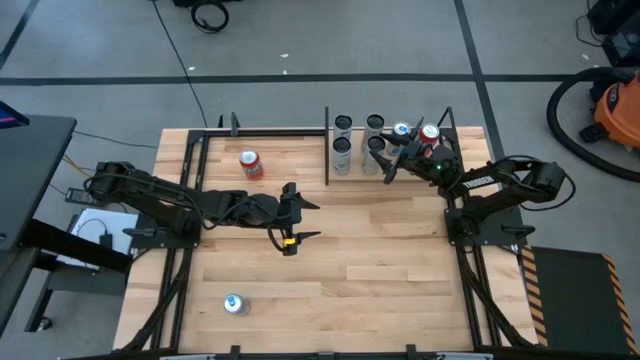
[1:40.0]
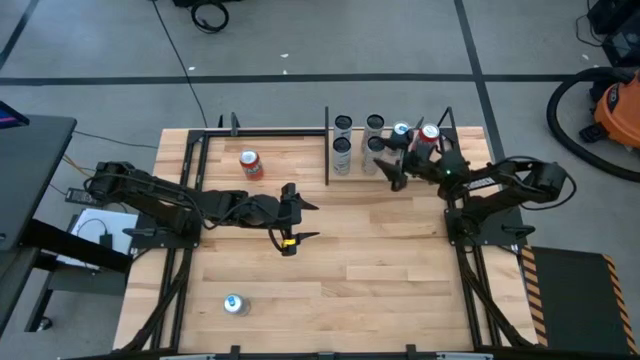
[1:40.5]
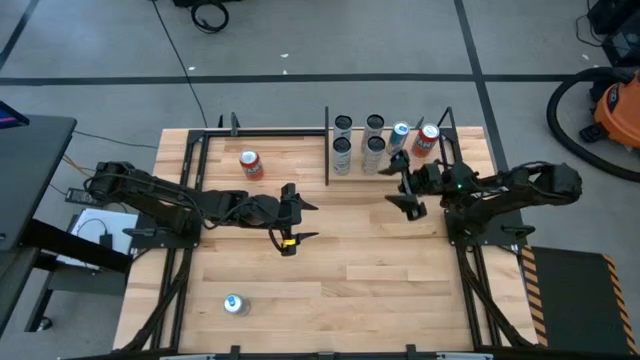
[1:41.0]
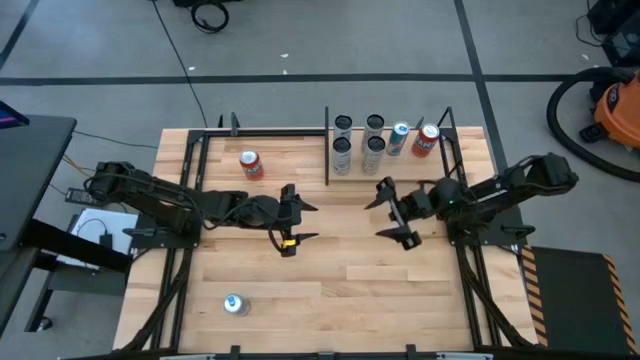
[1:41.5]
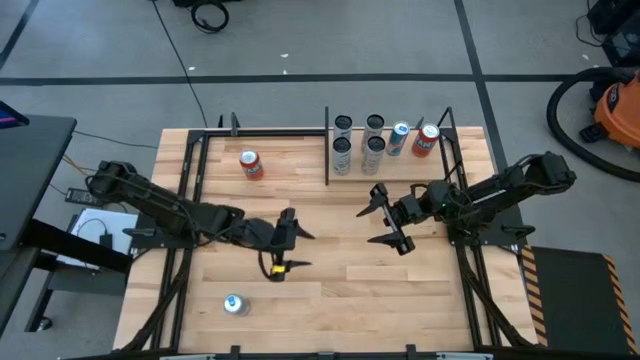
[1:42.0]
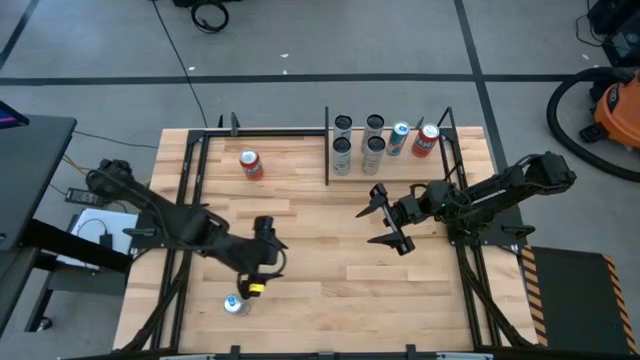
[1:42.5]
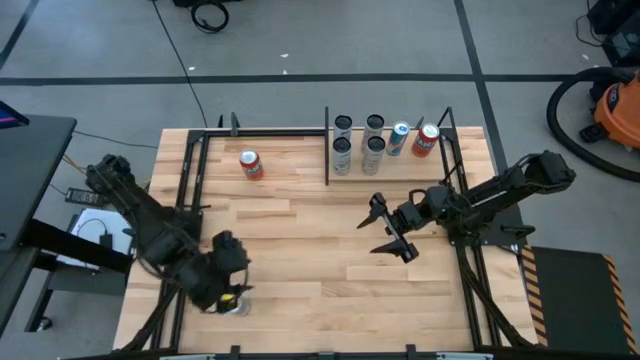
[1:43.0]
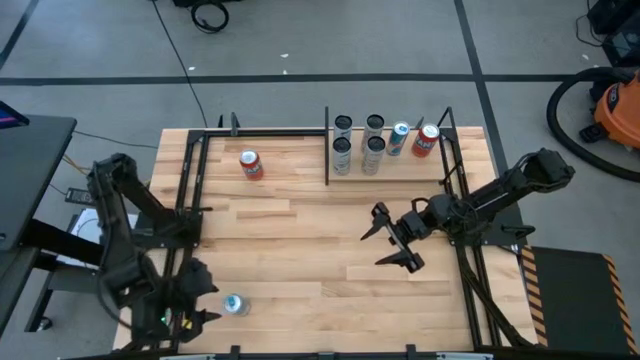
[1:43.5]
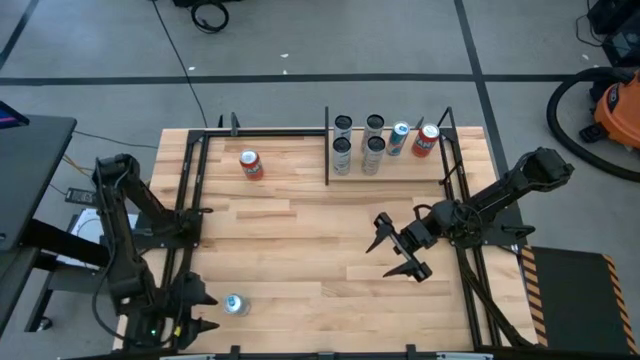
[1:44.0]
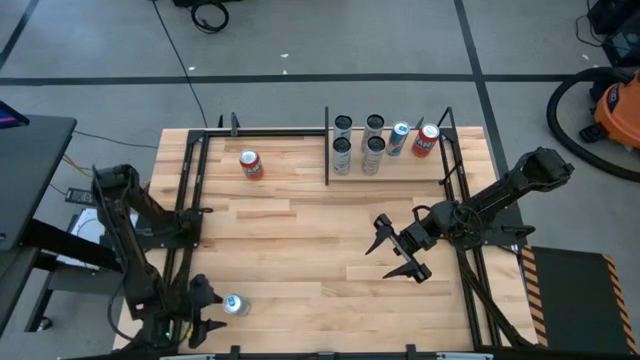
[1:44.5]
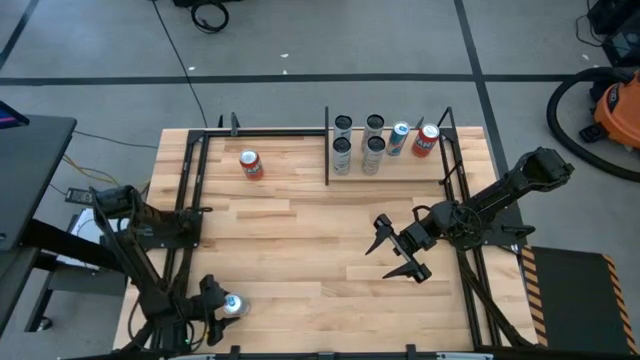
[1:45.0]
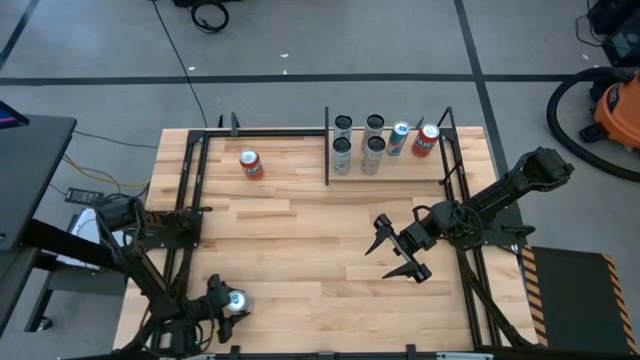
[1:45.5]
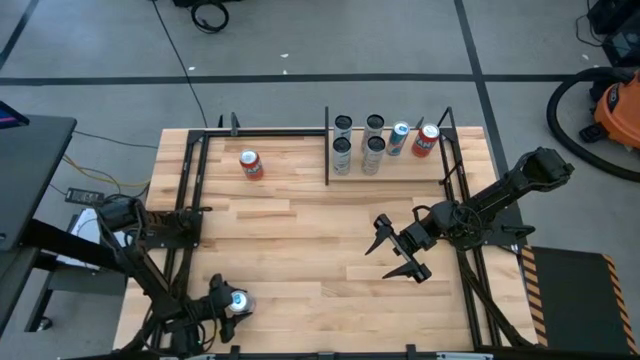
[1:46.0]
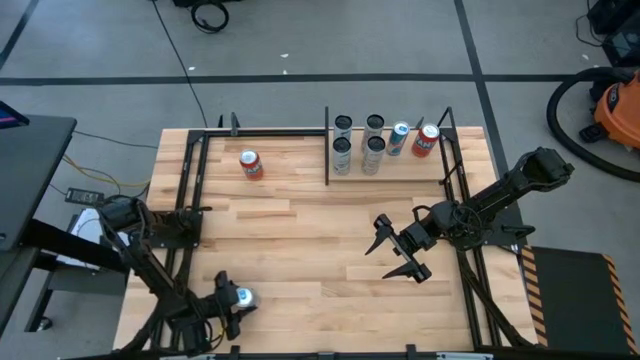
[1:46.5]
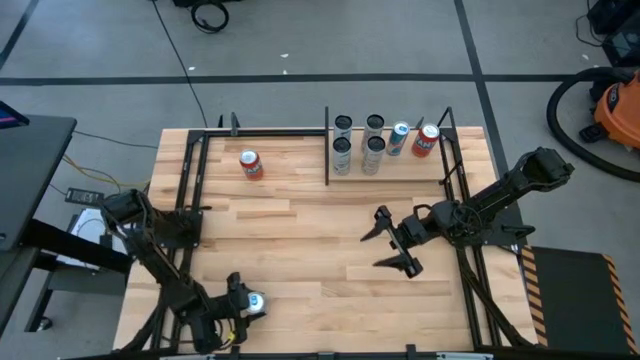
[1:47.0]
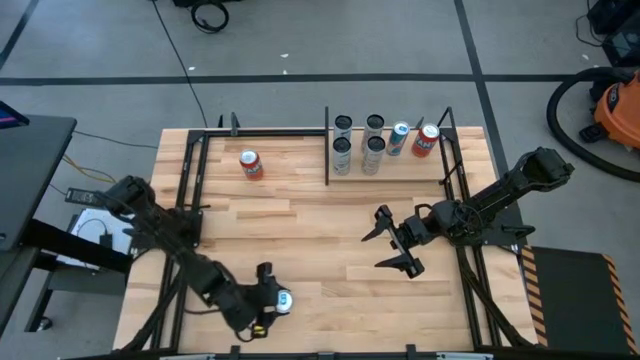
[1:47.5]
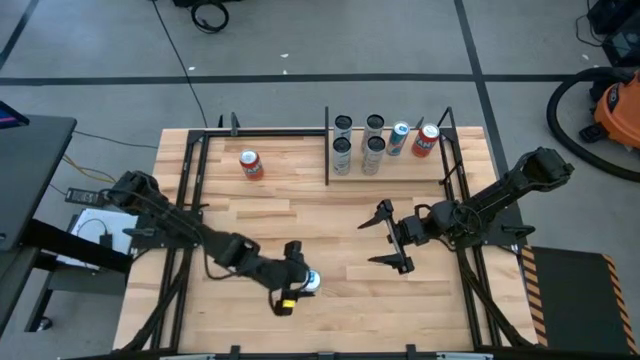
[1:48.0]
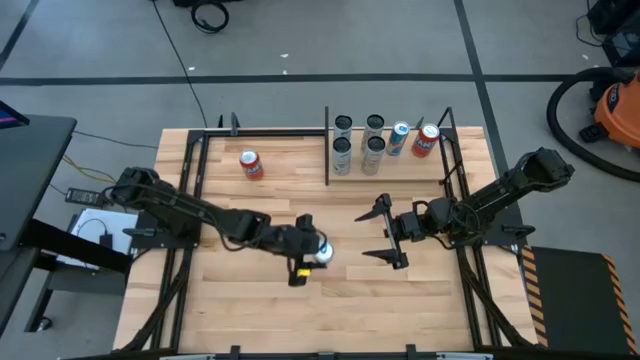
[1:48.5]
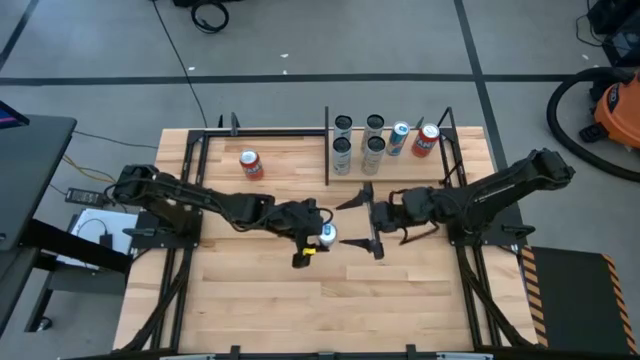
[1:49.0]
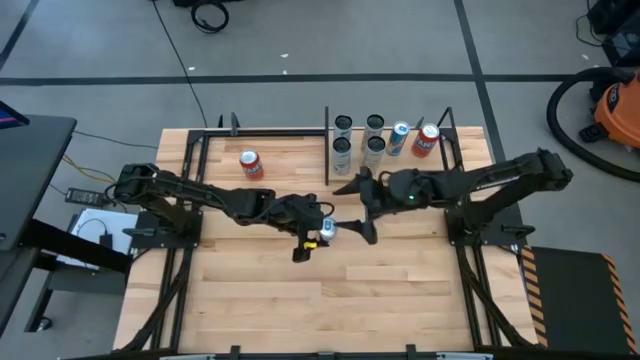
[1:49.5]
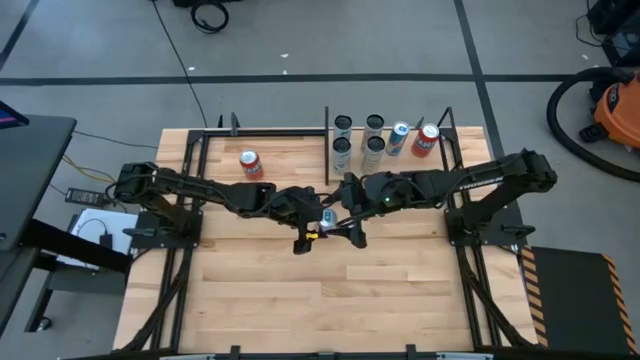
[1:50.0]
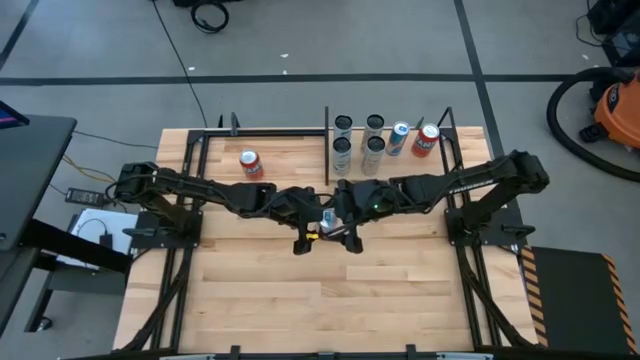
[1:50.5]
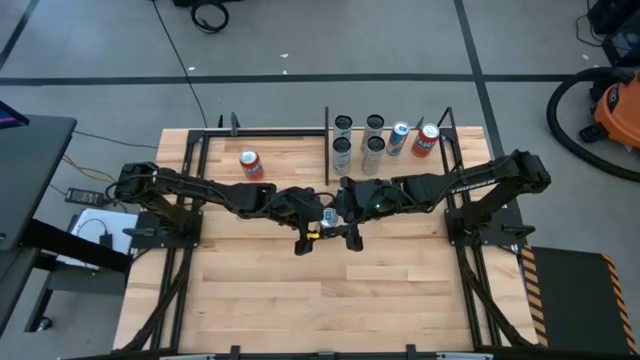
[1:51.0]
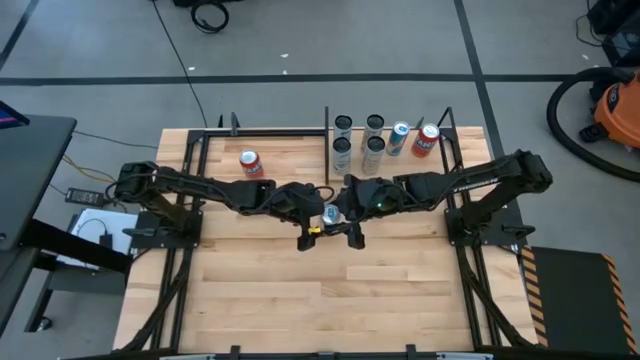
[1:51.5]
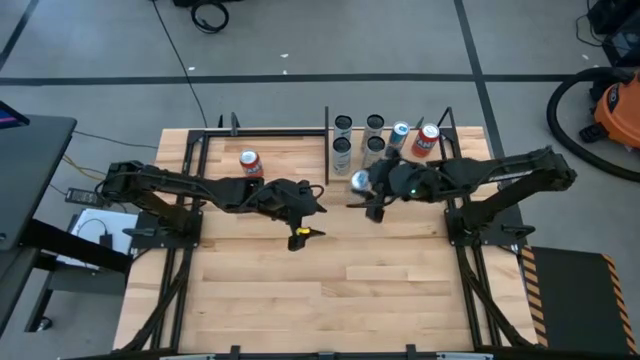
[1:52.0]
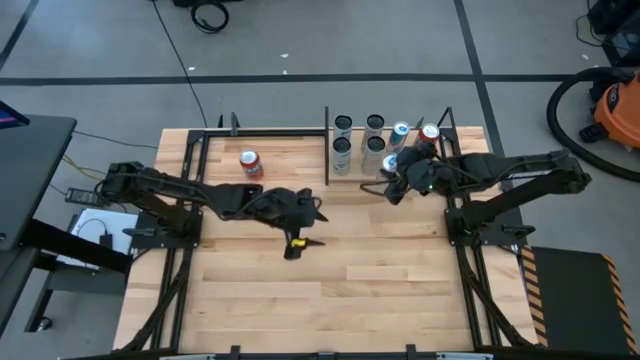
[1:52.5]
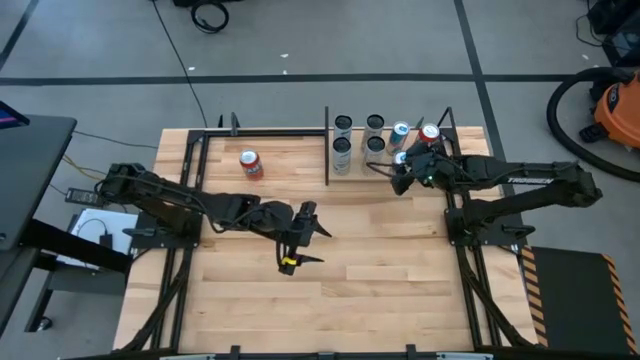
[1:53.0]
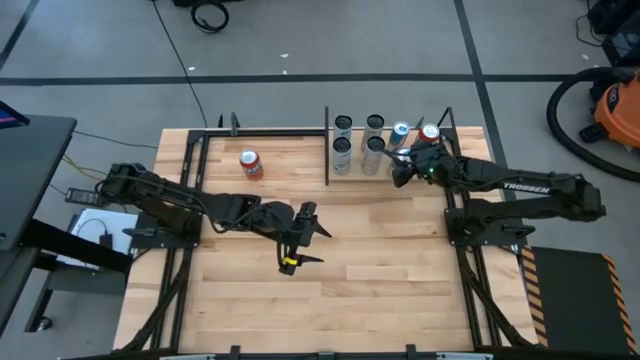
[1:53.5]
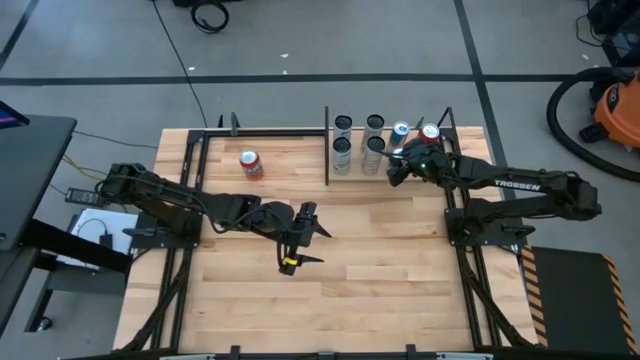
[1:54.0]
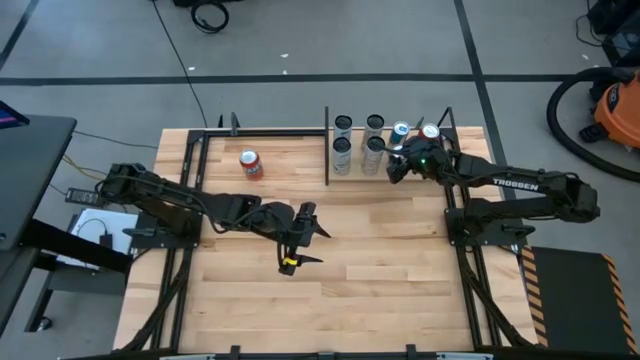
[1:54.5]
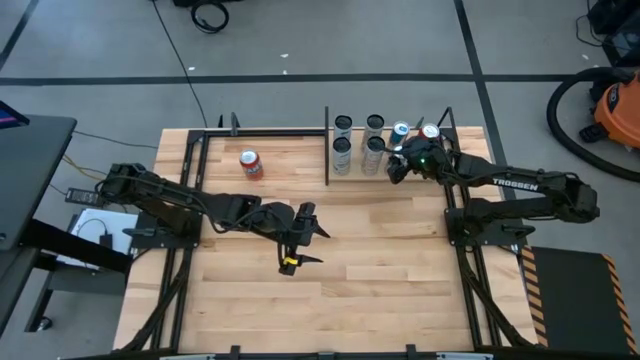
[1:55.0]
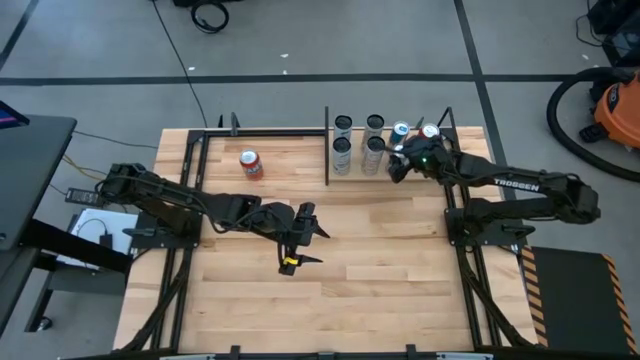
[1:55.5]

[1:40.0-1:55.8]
Task: Place canned beverage on shelf
Put the blue soda can on the shelf aligned with the other blue soda can

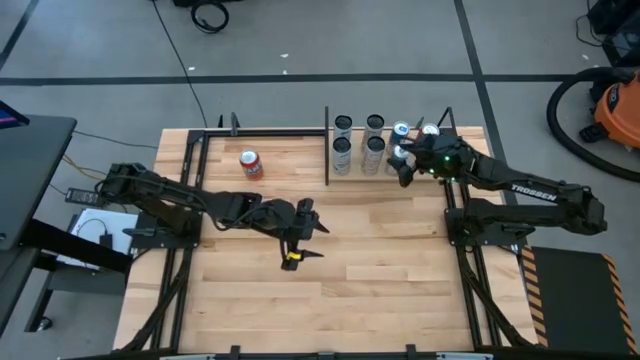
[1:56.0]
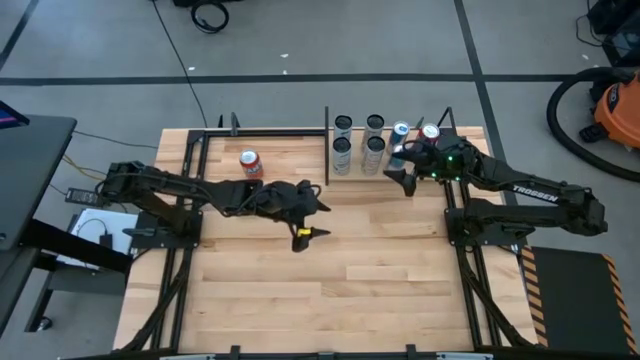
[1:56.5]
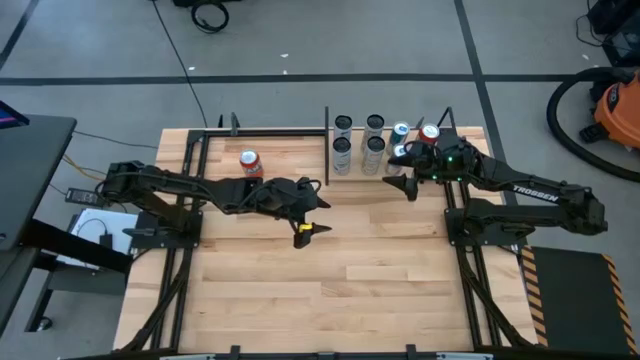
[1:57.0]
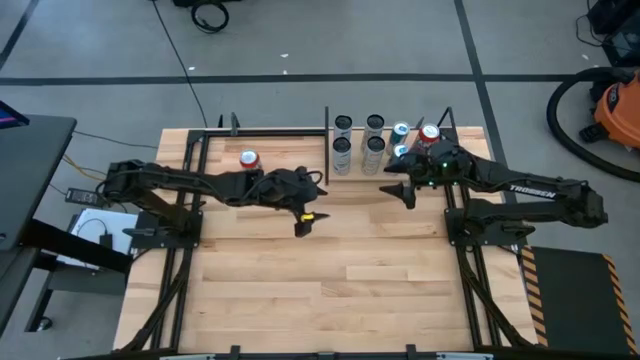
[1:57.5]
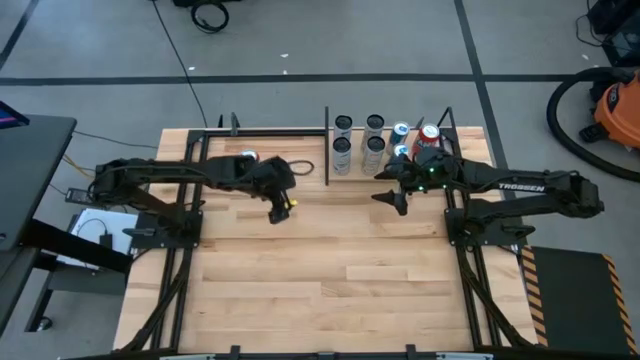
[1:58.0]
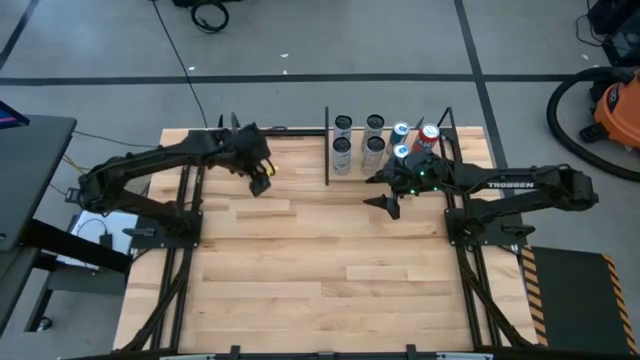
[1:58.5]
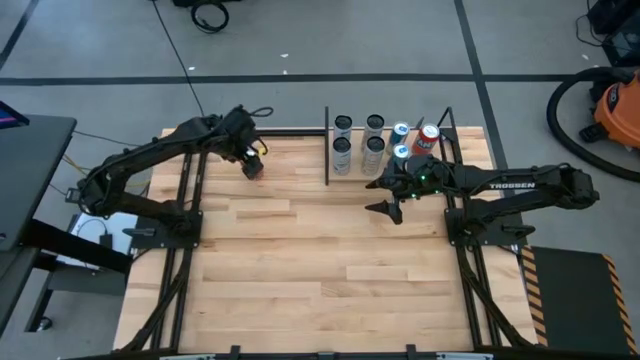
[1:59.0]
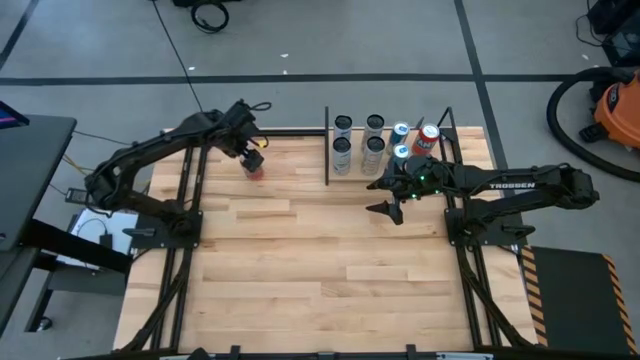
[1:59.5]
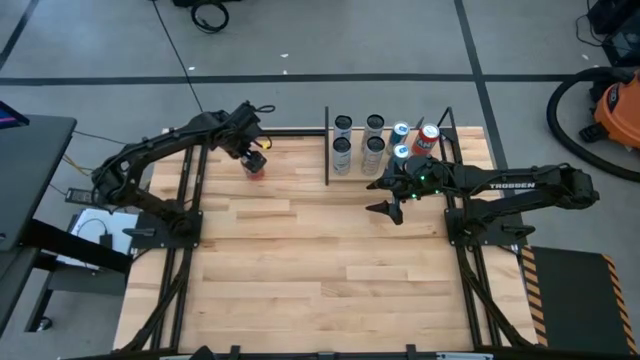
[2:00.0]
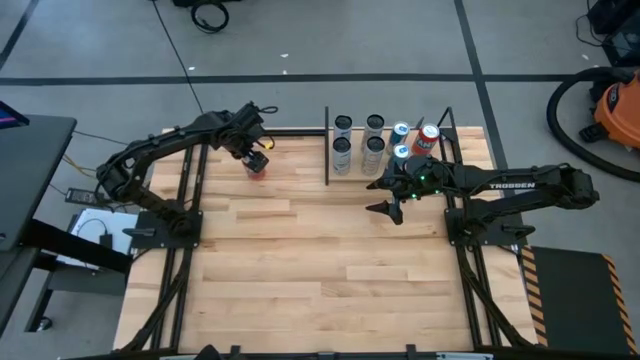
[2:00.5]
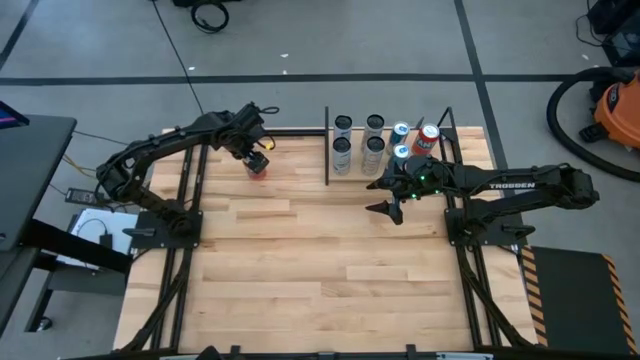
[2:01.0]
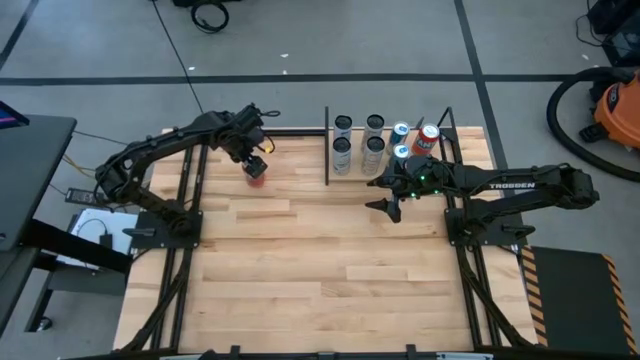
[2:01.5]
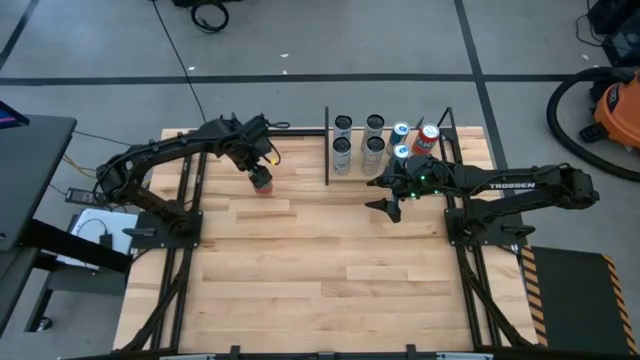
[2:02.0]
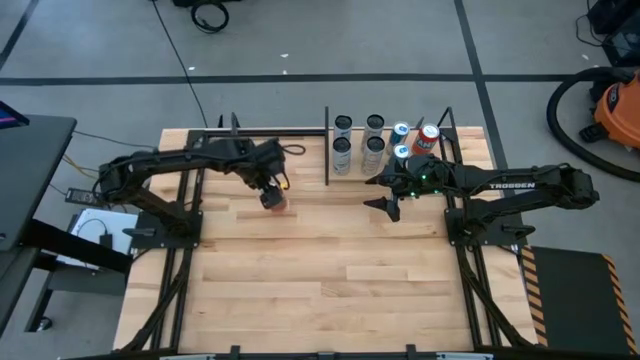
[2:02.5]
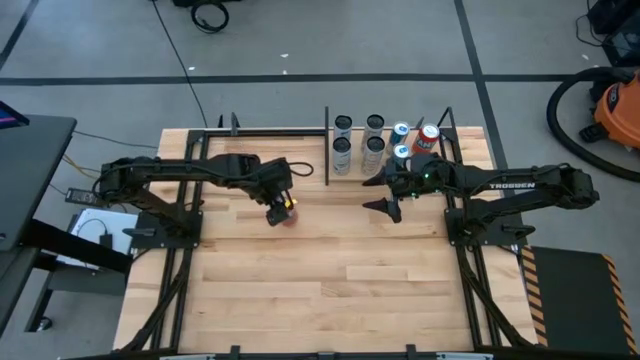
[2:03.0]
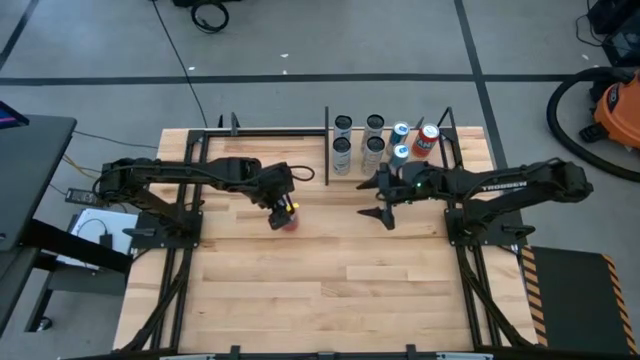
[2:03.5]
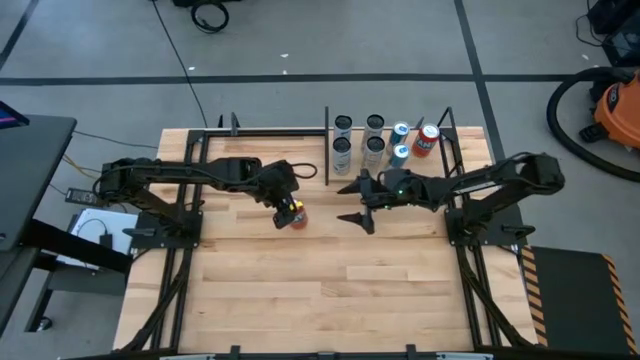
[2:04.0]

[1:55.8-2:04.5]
Put the red soda can on the shelf aligned with the other orange soda can
